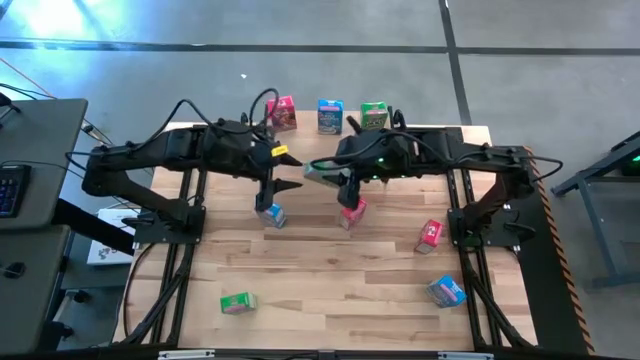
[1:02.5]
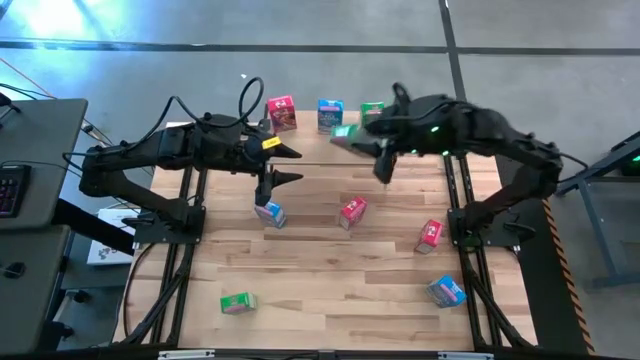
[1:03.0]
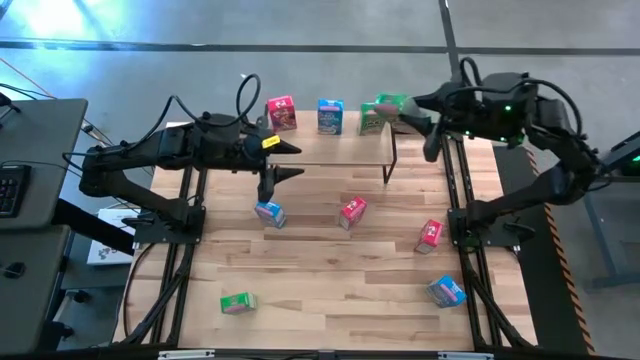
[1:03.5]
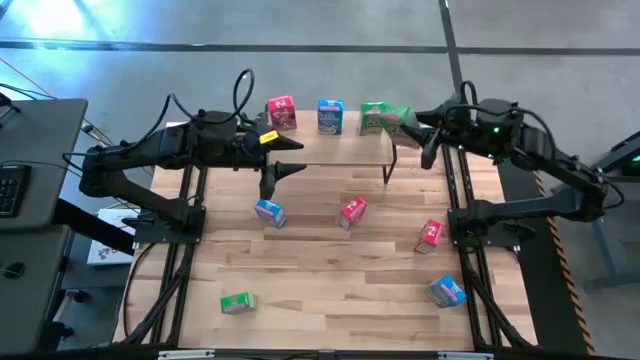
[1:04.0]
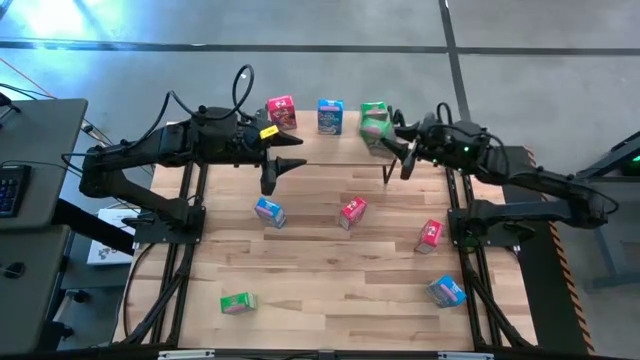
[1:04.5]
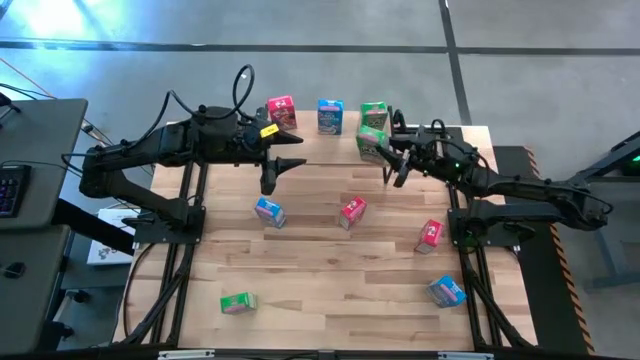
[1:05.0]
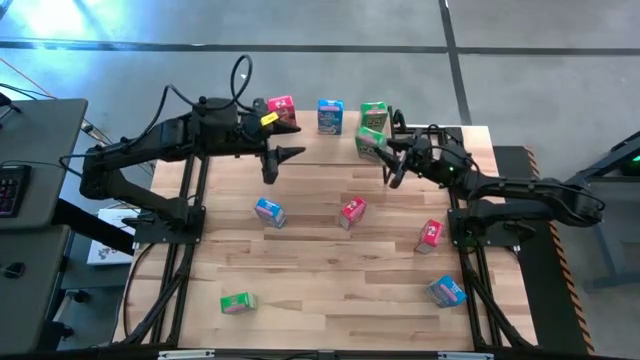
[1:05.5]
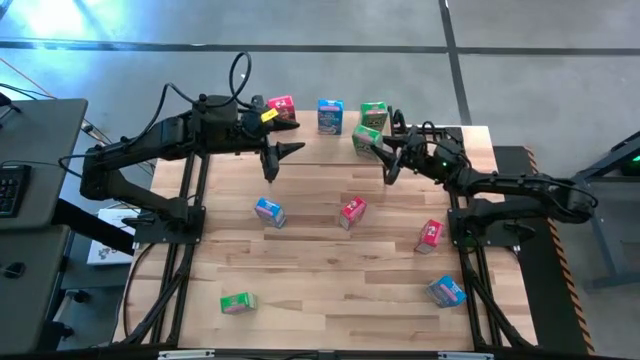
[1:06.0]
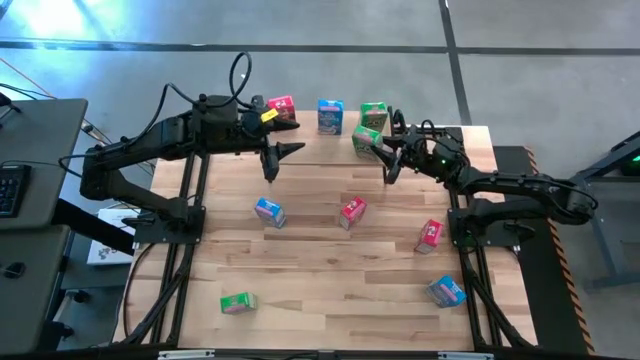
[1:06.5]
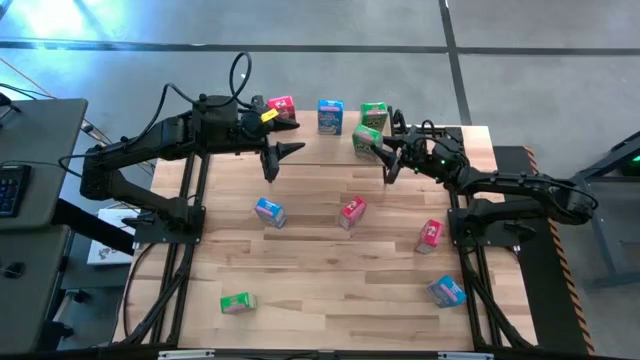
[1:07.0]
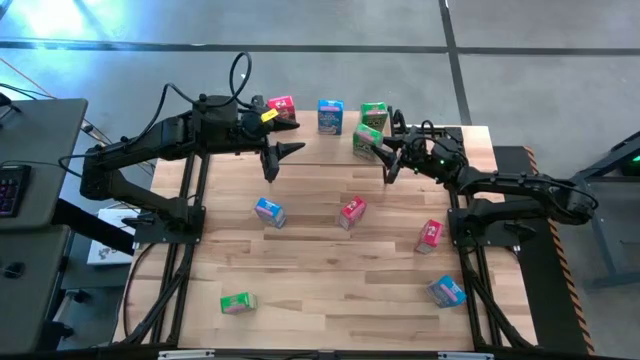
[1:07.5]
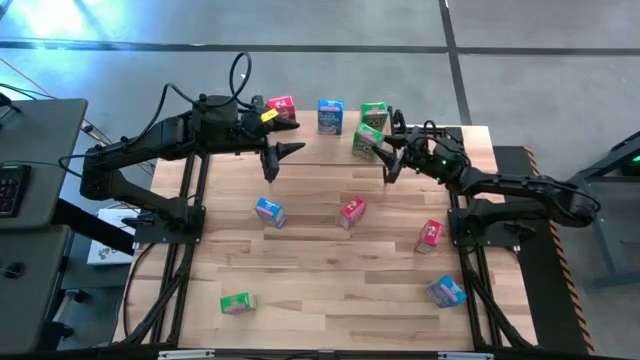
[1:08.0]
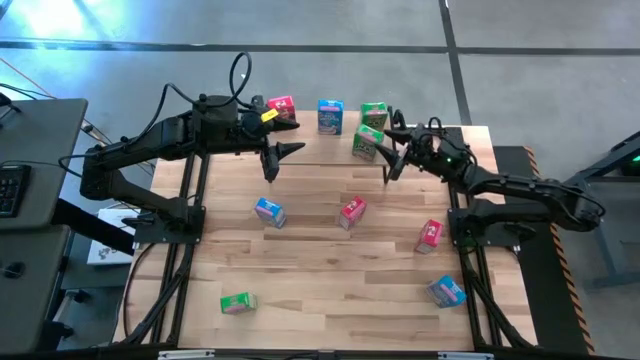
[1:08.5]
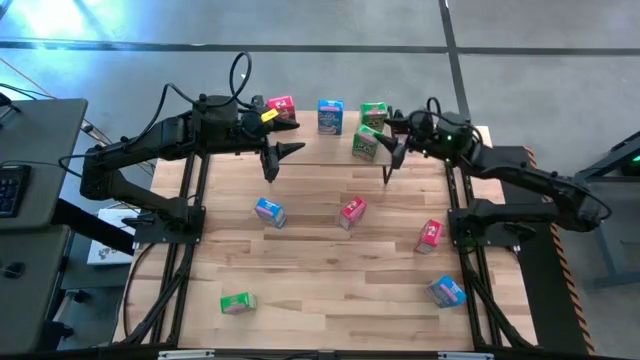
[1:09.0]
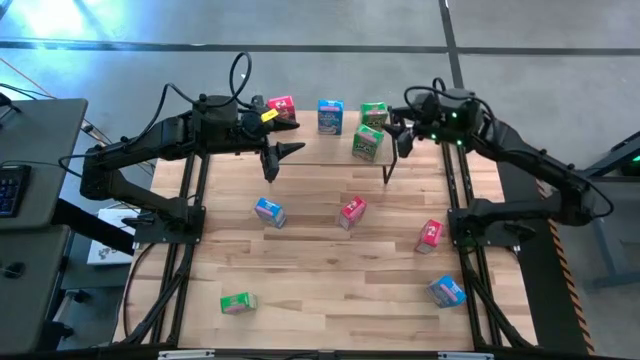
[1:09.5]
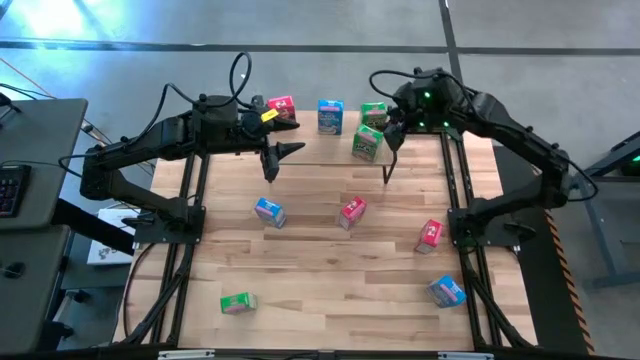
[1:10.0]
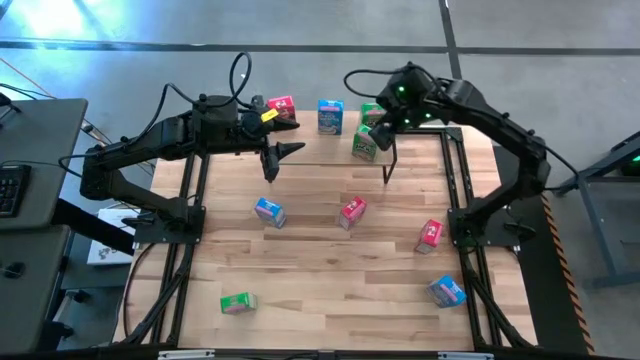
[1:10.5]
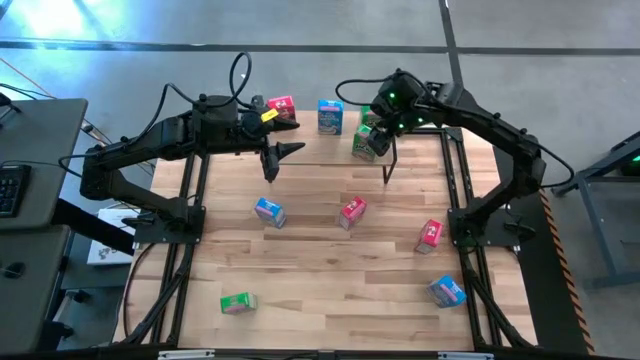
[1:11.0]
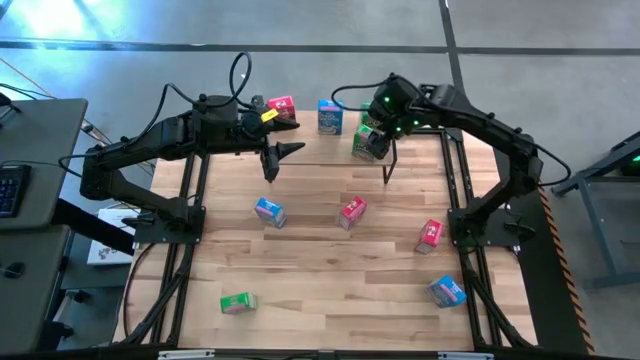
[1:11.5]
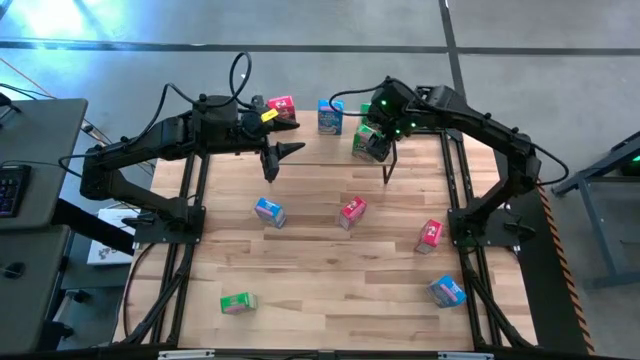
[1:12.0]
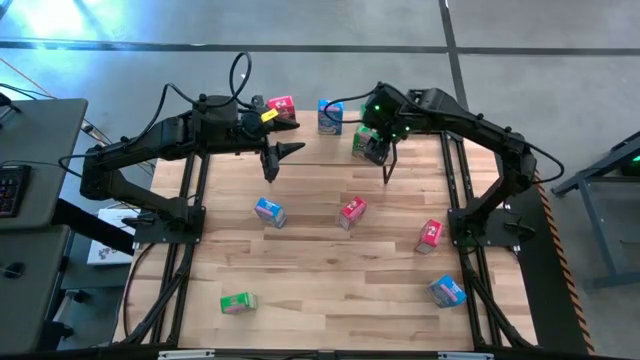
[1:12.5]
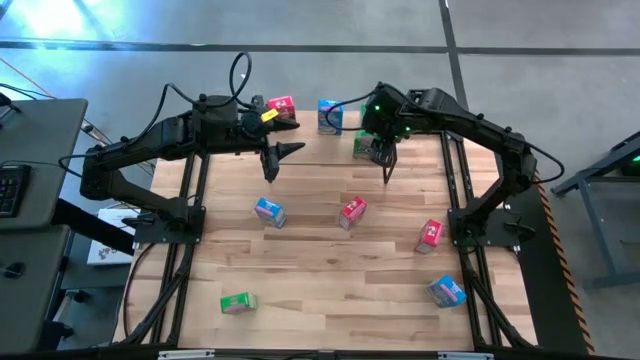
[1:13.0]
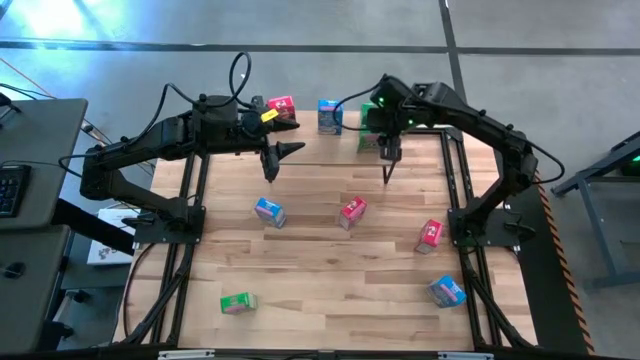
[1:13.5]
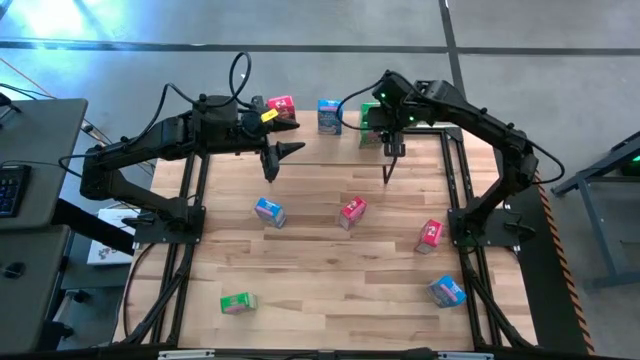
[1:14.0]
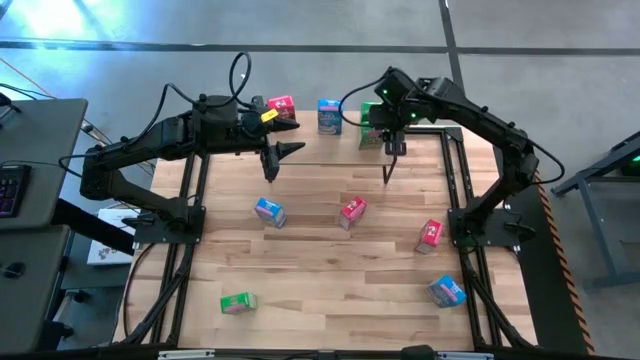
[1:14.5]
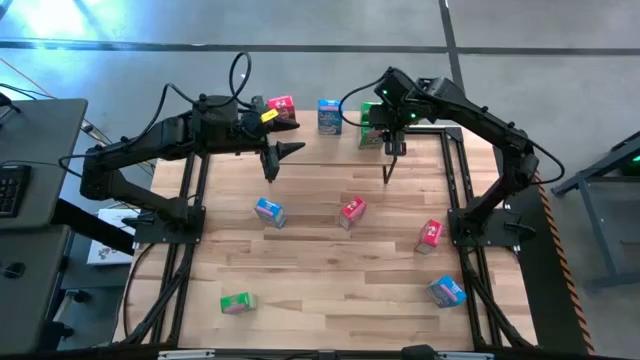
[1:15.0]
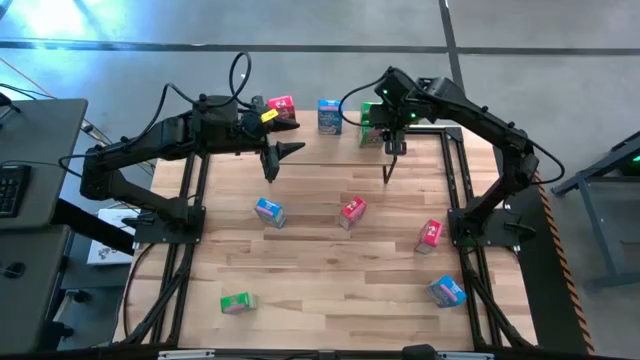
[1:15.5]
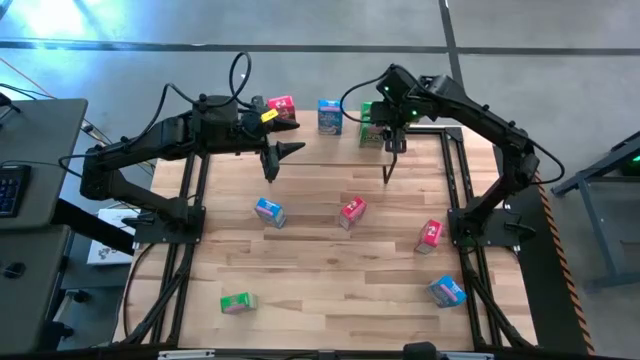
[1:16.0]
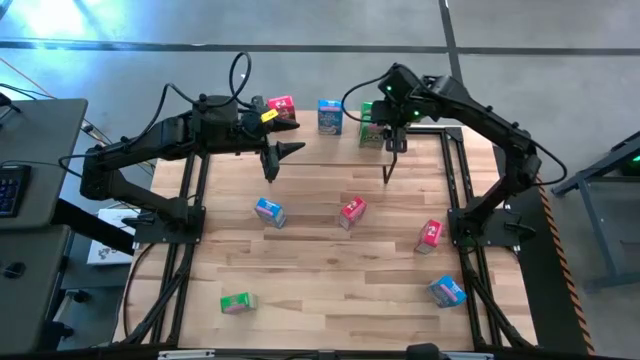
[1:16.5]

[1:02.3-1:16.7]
Task: Stack cereal on shelf
Put the top green cereal box on the shelf aligned with the other green cereal box

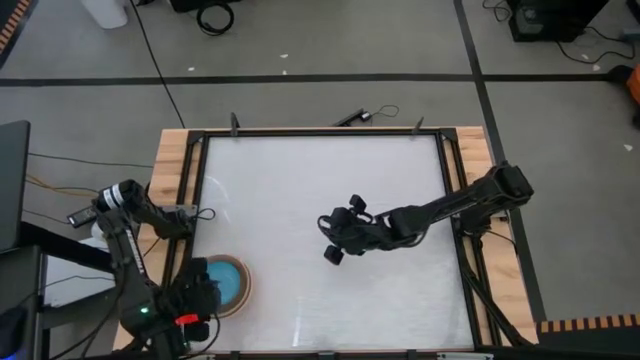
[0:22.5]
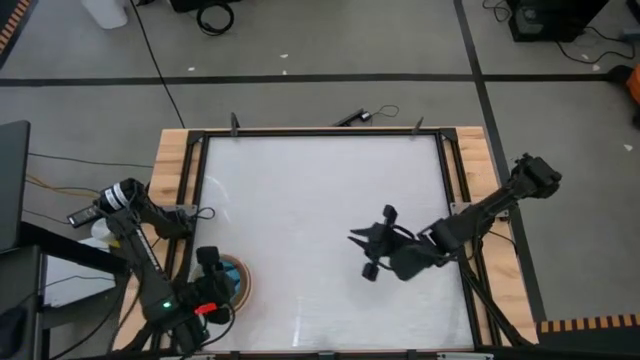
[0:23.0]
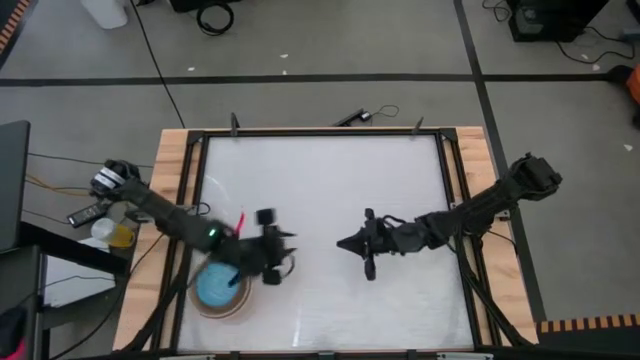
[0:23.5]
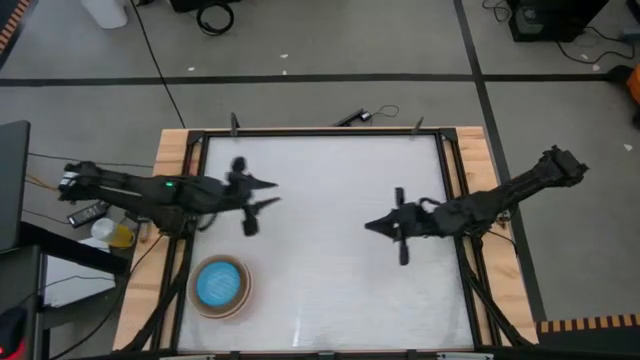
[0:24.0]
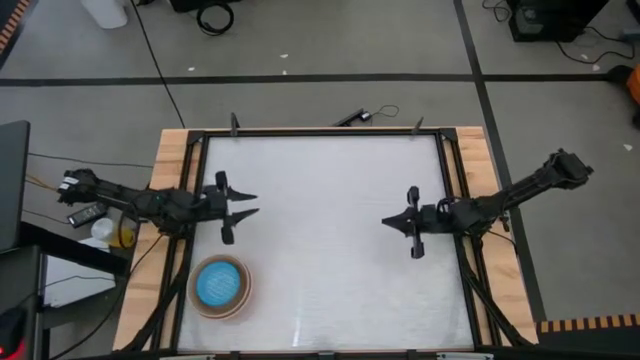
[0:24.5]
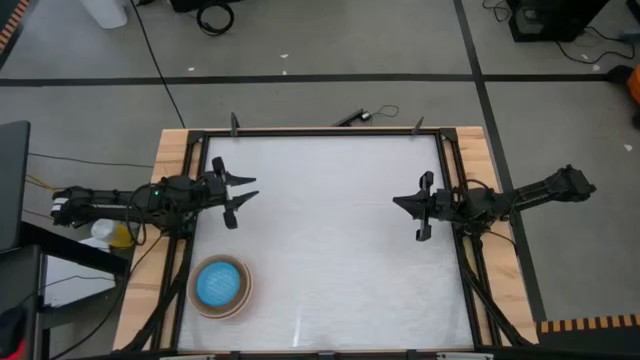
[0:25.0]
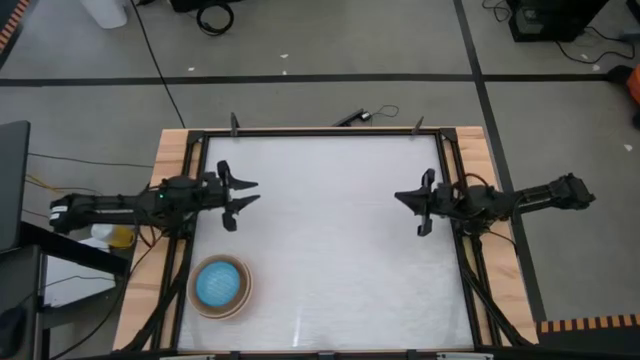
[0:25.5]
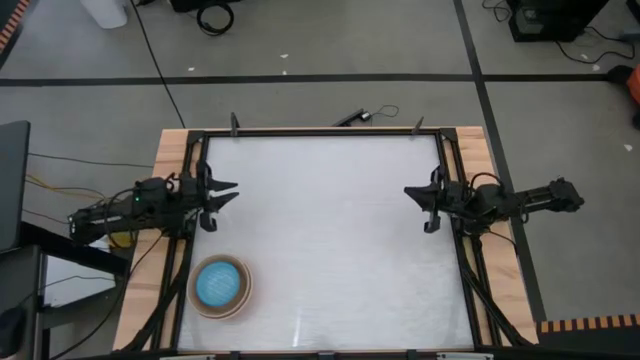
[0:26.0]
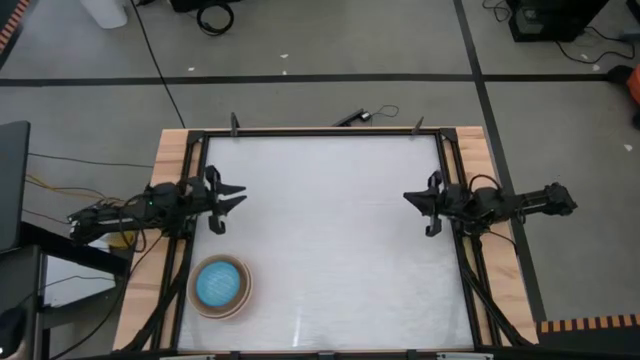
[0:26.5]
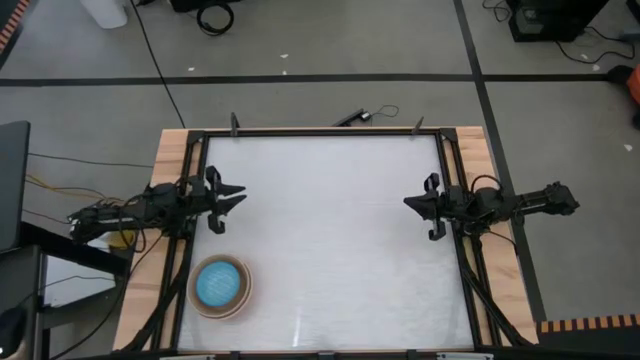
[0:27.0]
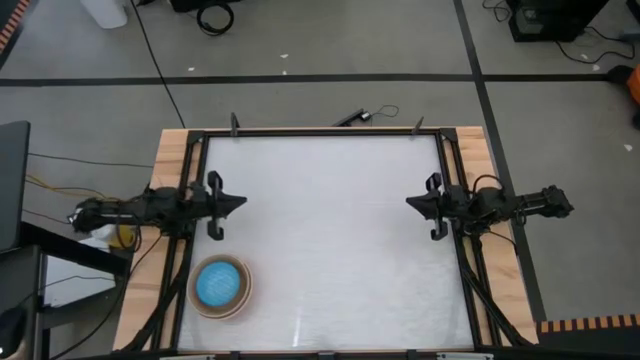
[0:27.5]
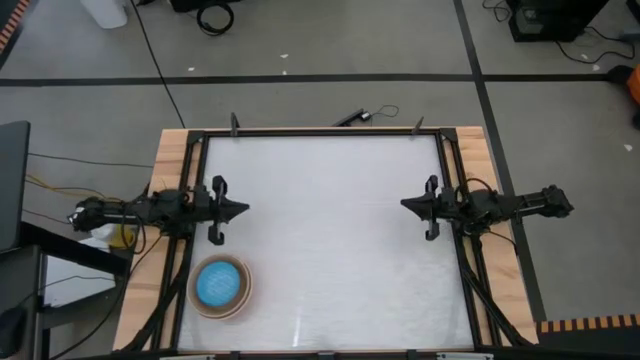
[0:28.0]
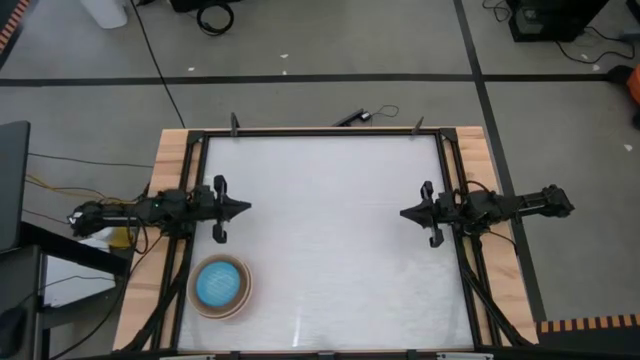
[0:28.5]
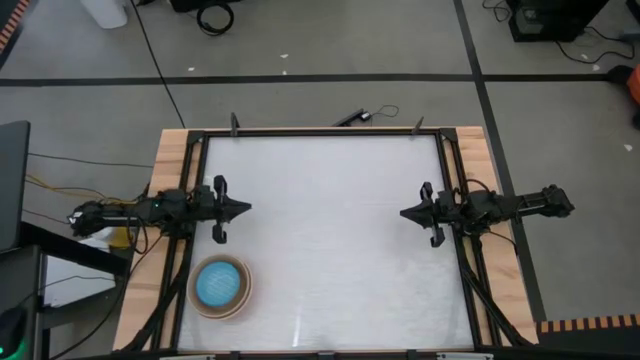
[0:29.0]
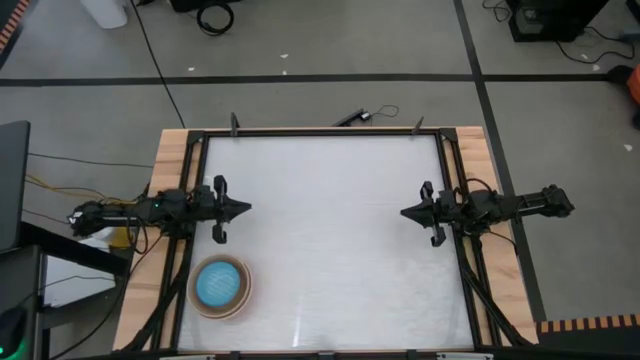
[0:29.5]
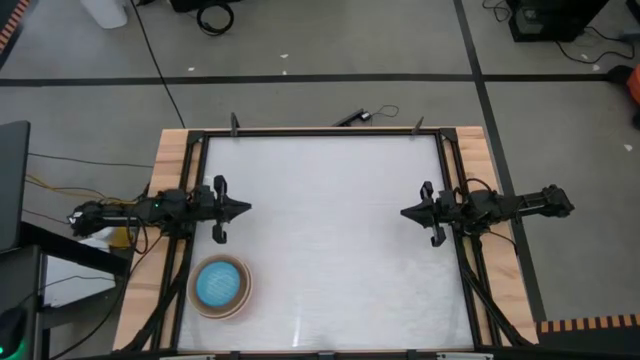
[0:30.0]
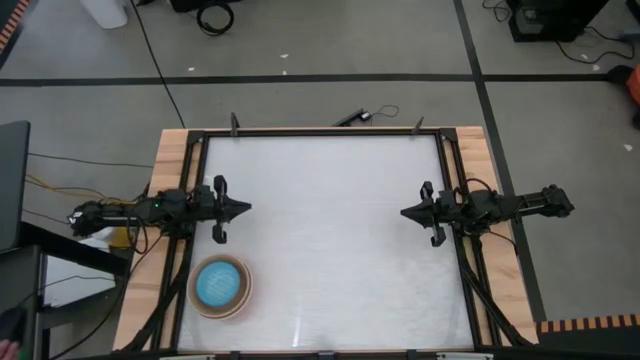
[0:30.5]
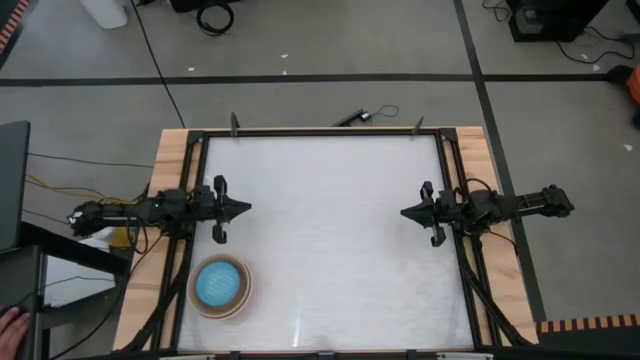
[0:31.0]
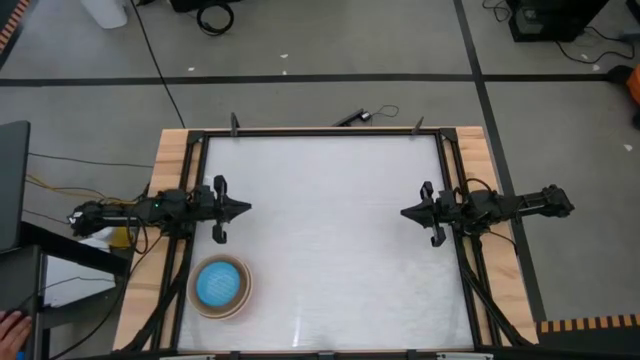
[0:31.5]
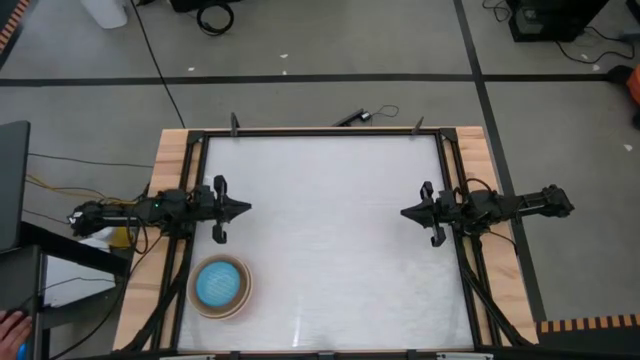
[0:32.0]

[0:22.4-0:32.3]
Task: Nest bowls inside each other by size order
Return to Home Position
